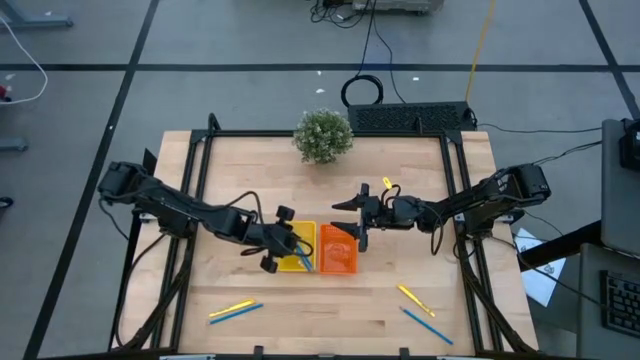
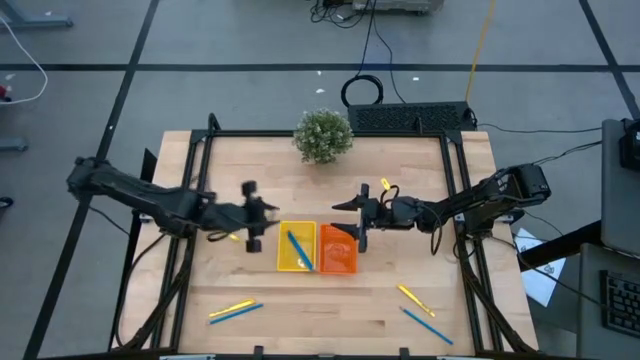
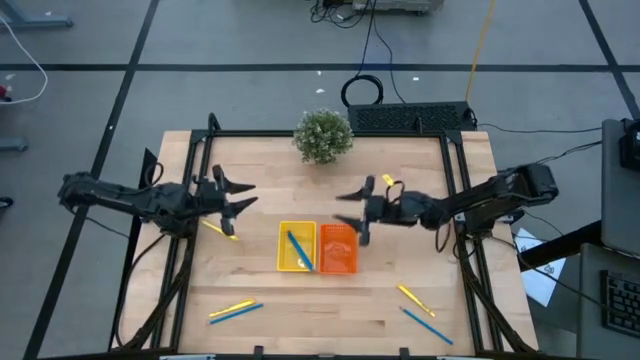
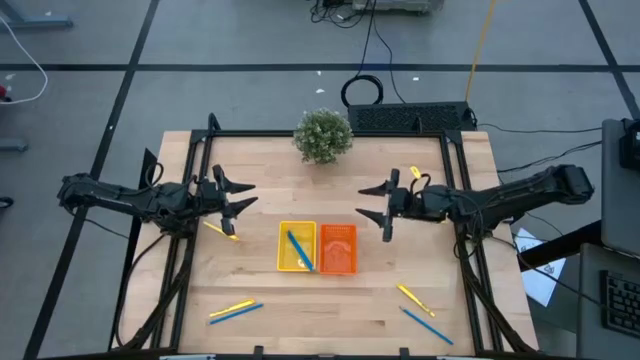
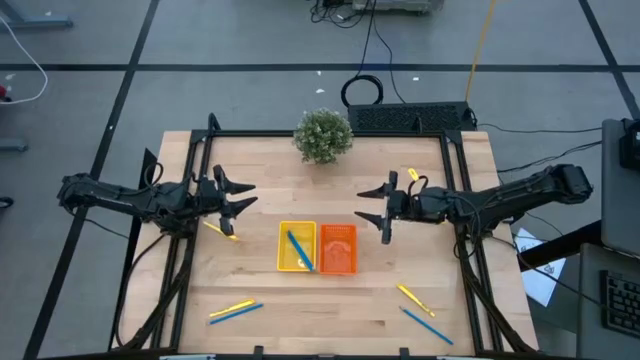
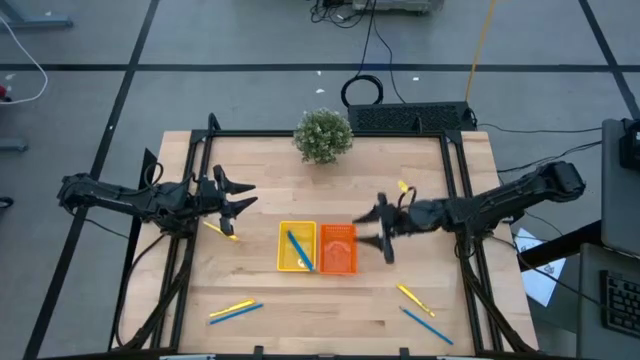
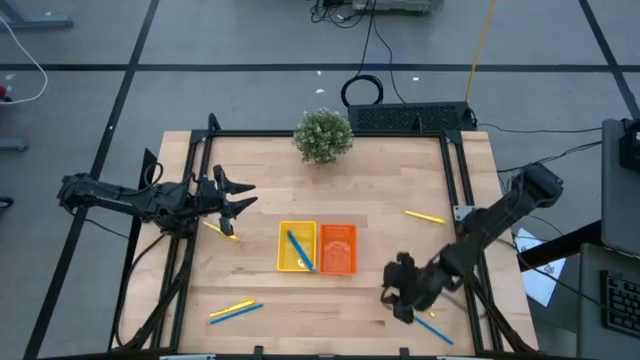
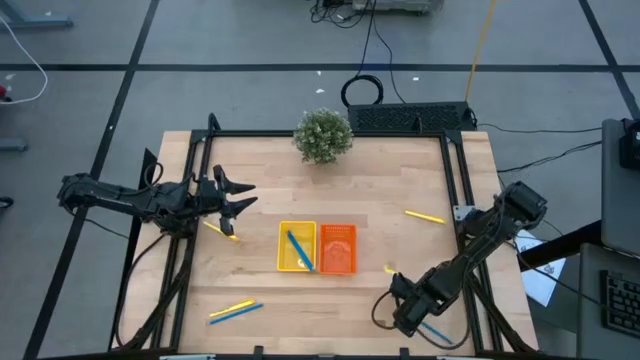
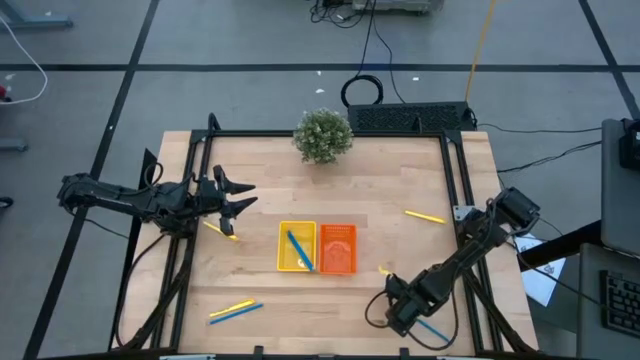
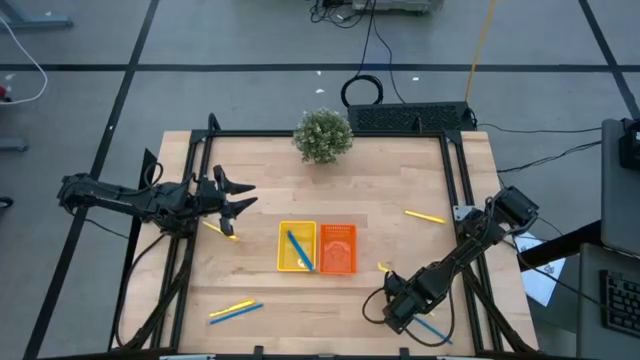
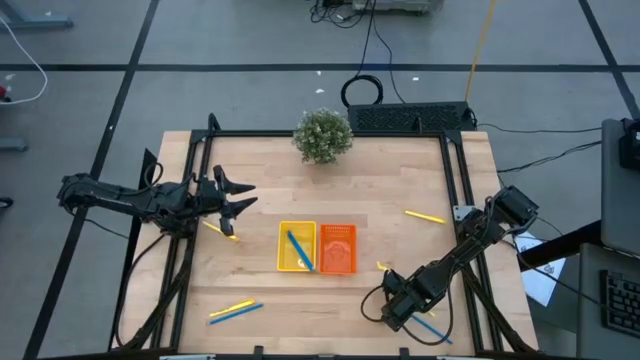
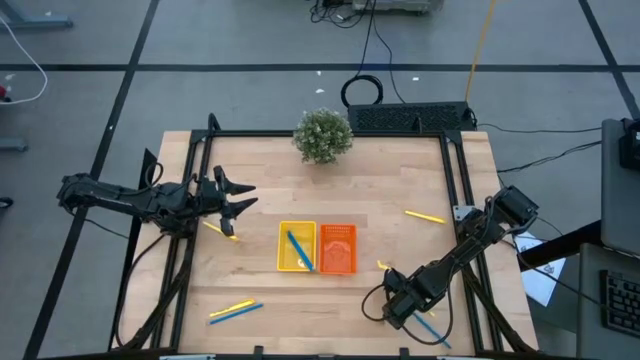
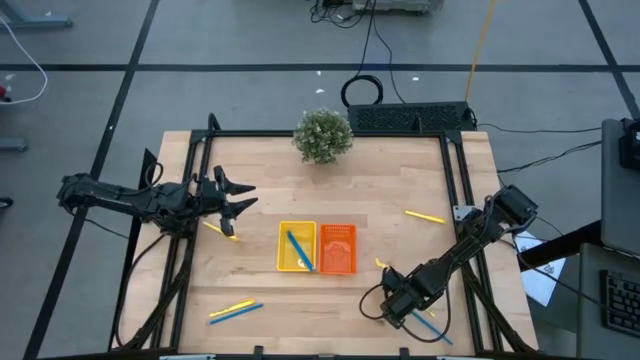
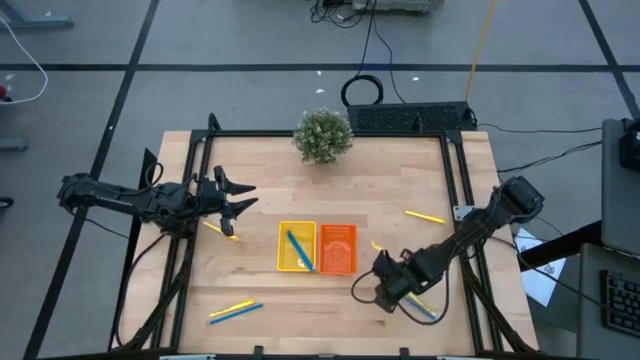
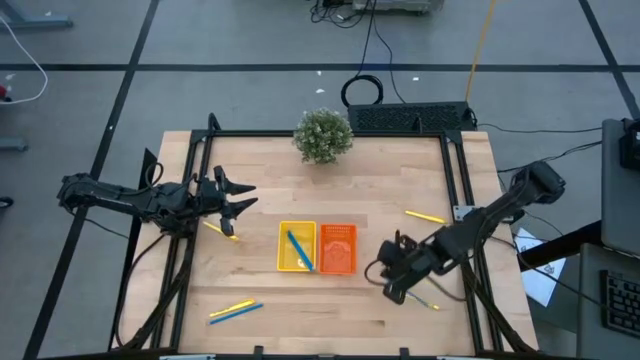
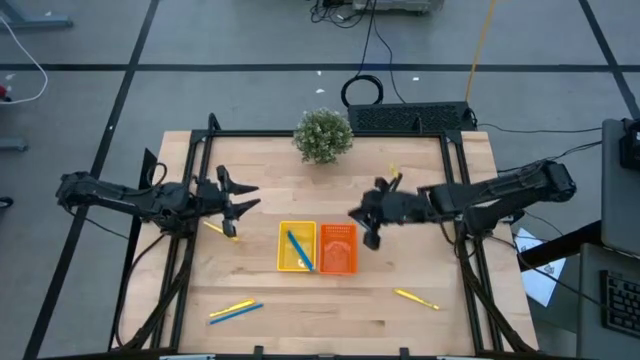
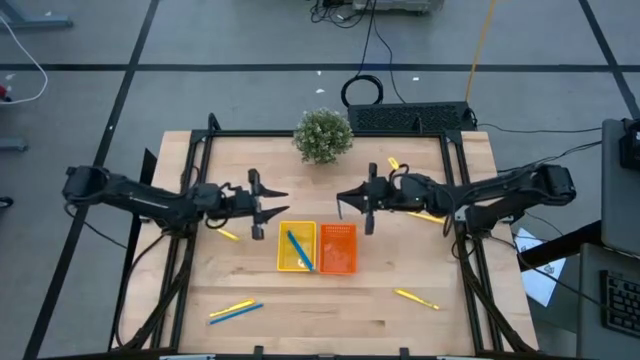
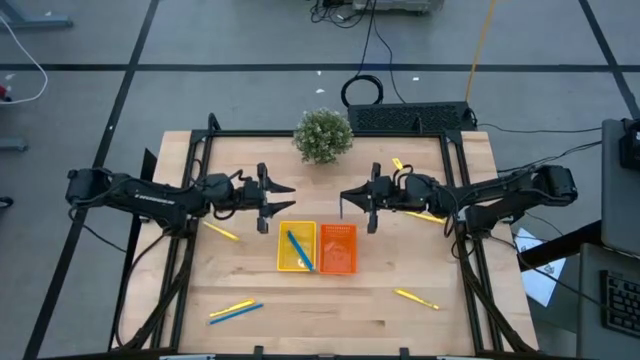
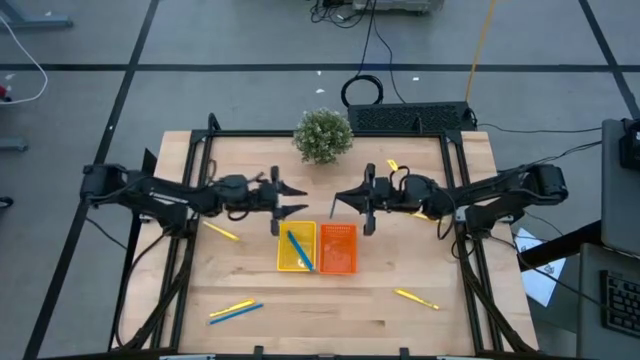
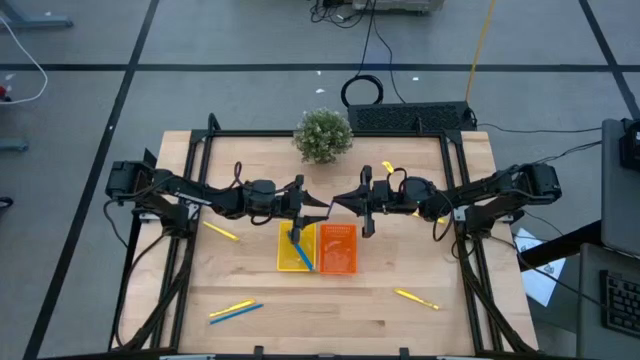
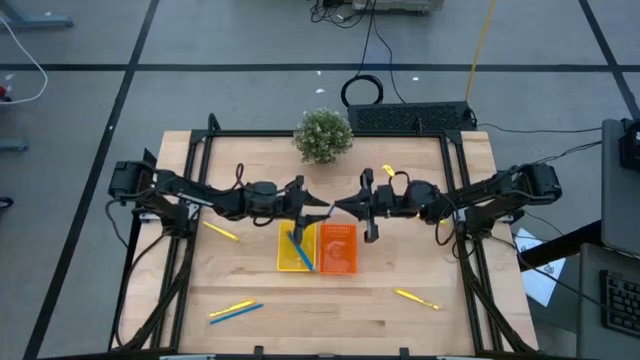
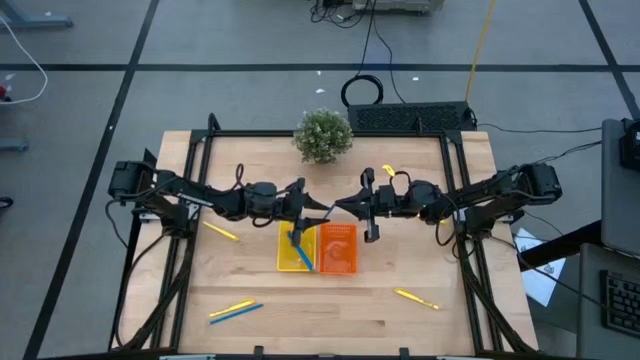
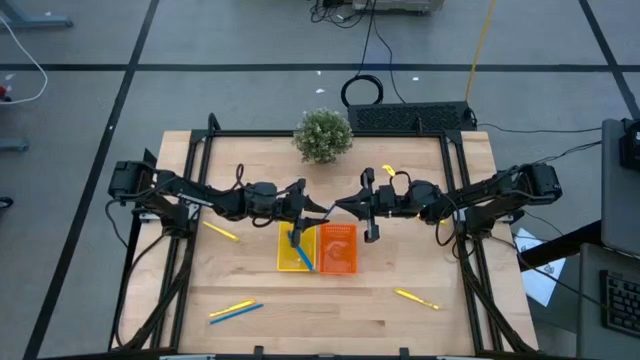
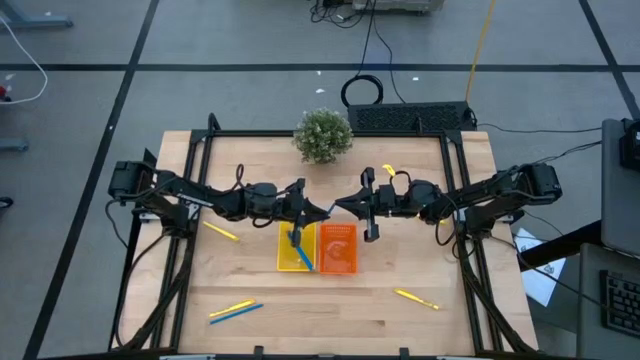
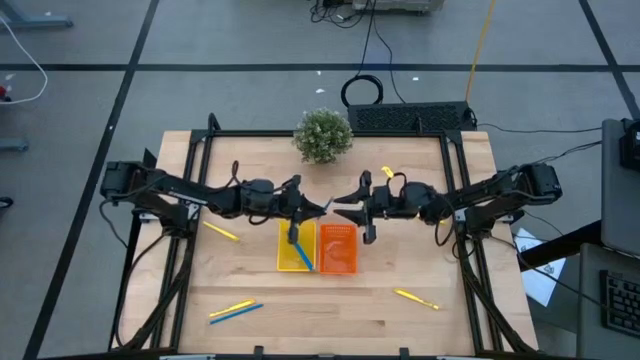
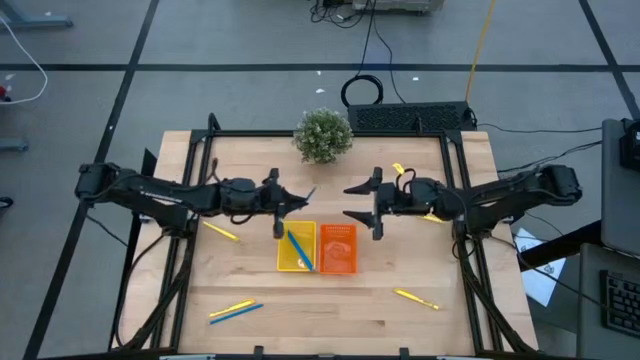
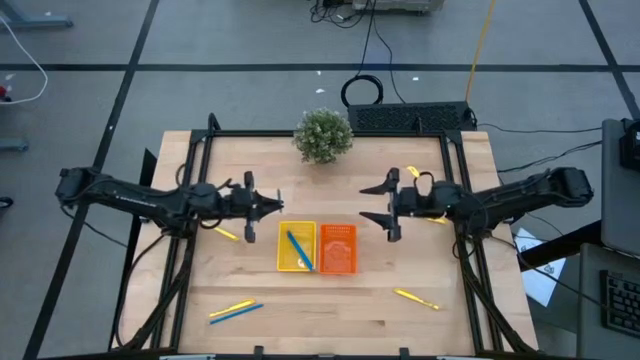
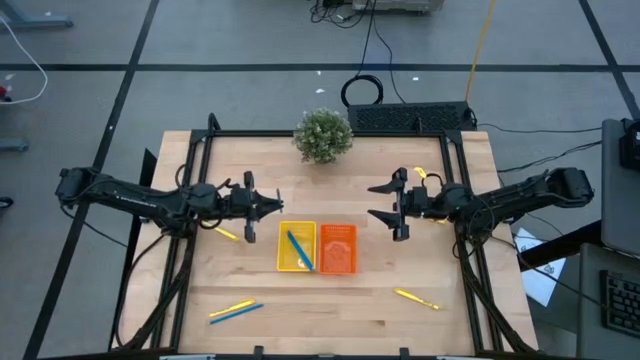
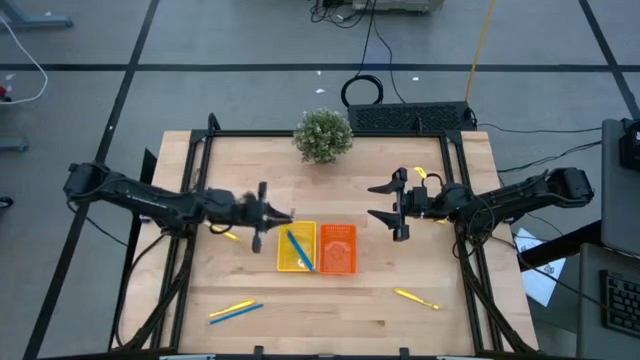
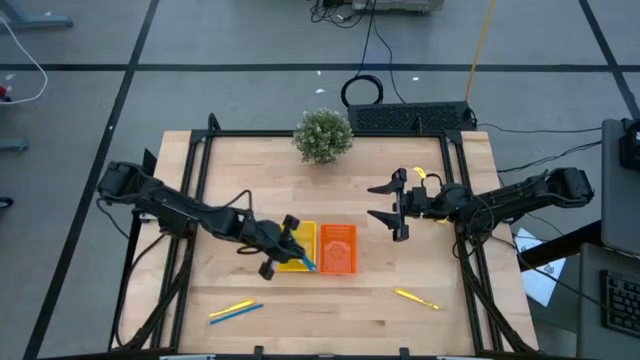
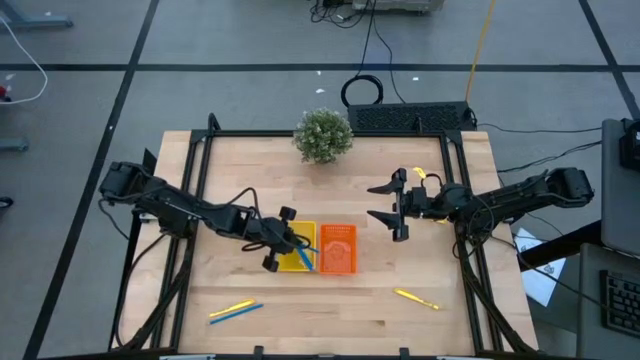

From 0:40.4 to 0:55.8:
Task: Sort pens & pencils
Put the right blue pencil into the yellow bin

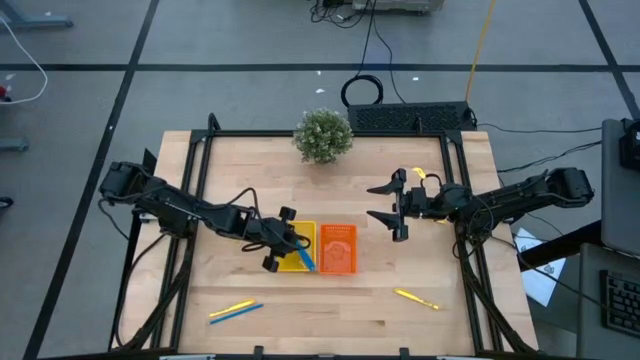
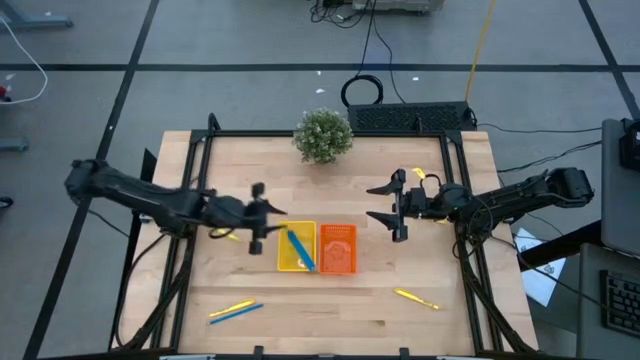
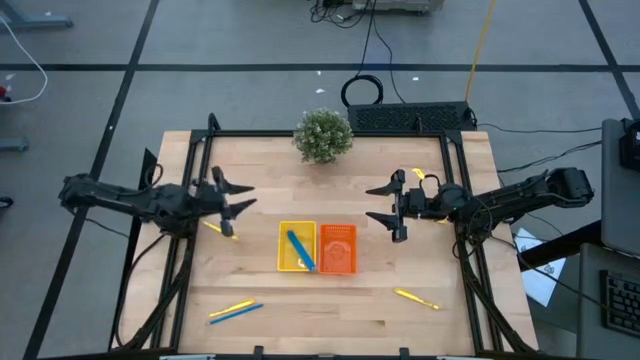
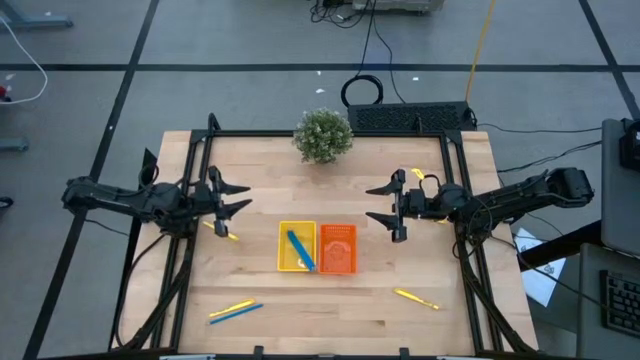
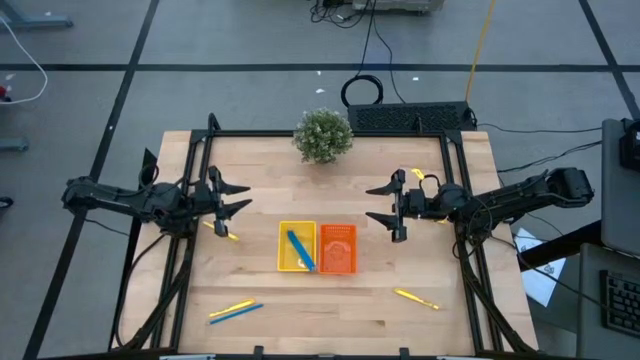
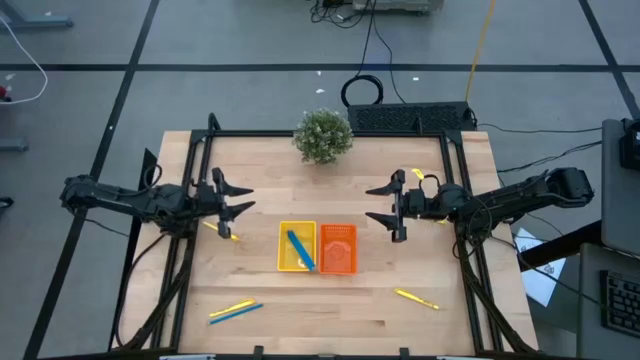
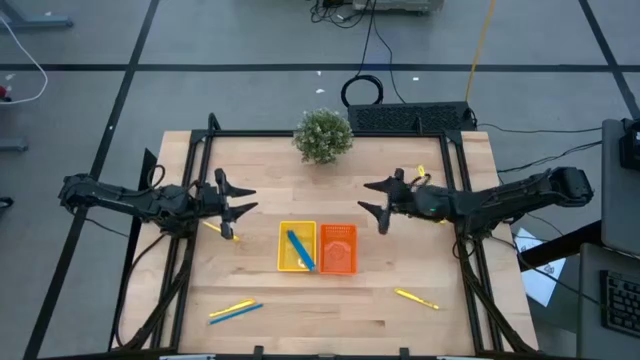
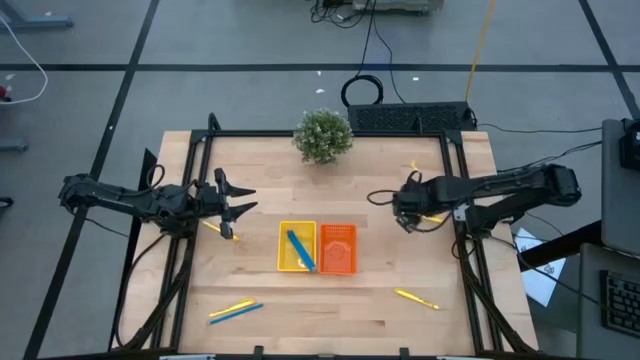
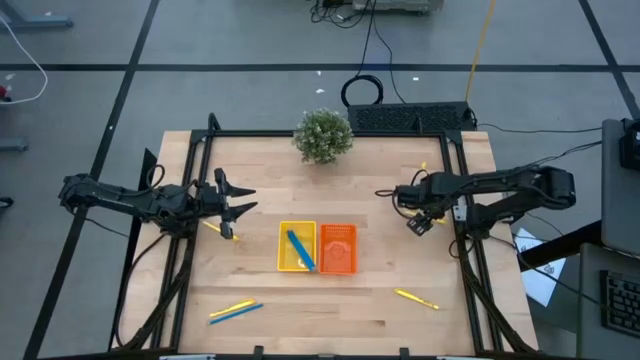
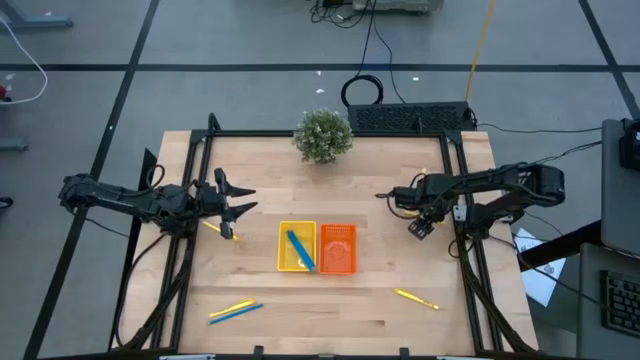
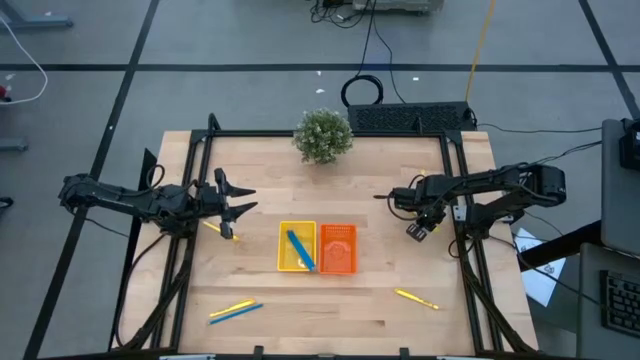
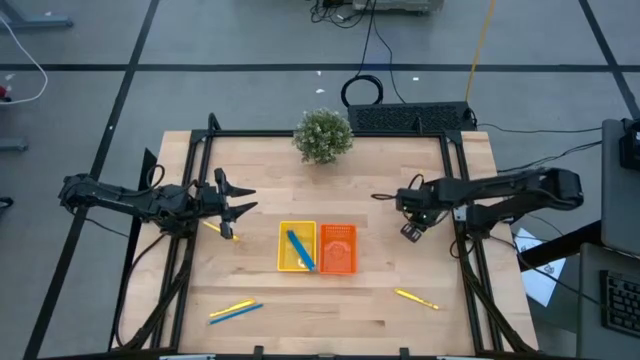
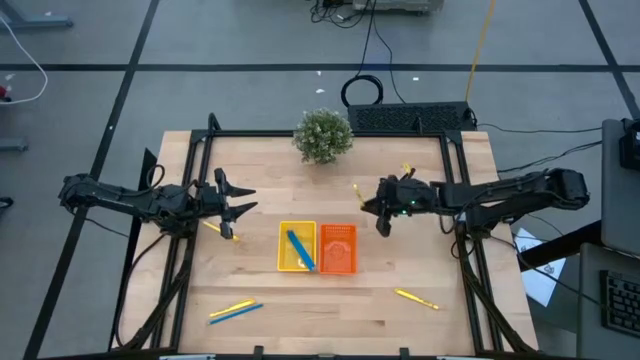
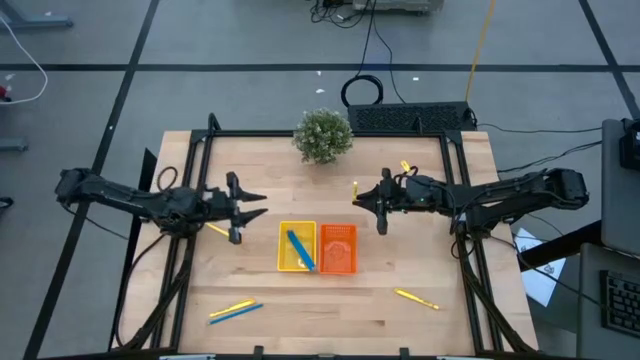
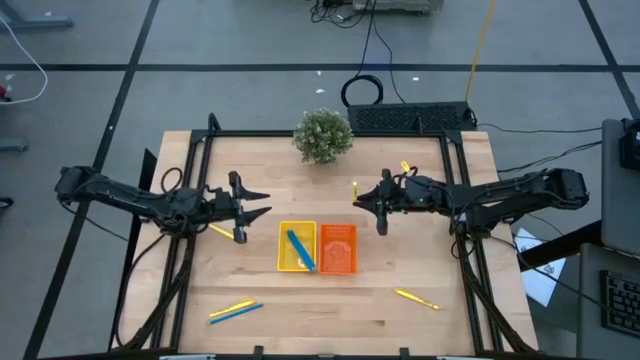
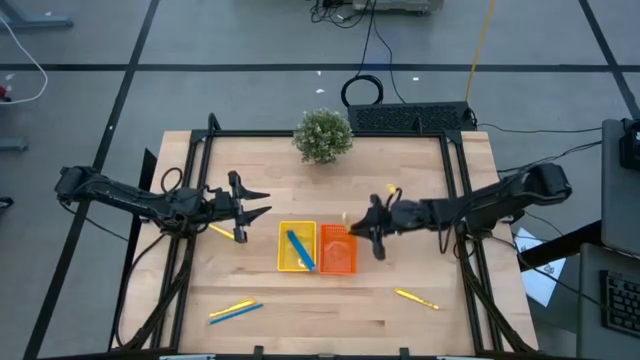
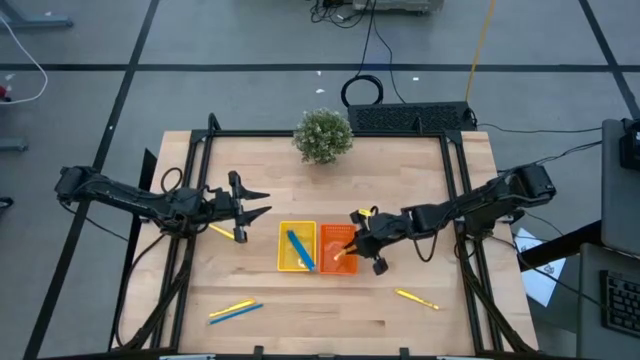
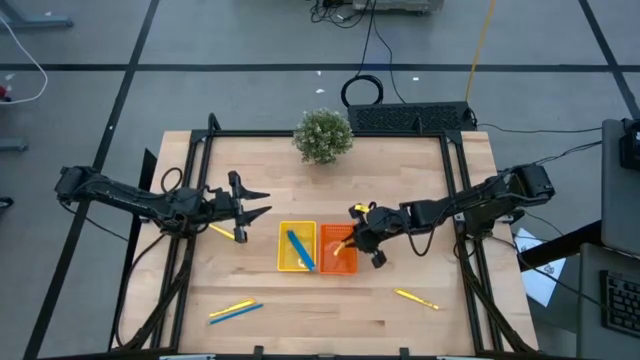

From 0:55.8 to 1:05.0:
Put the top right yellow pen into the orange bin
